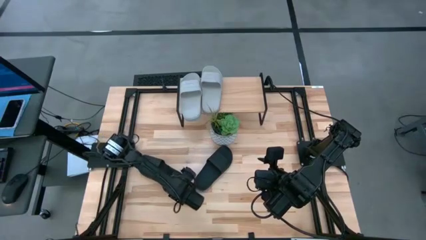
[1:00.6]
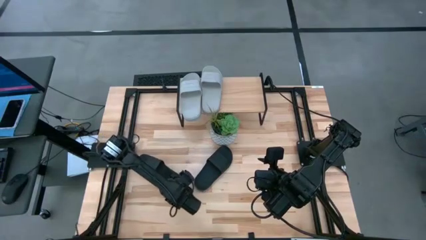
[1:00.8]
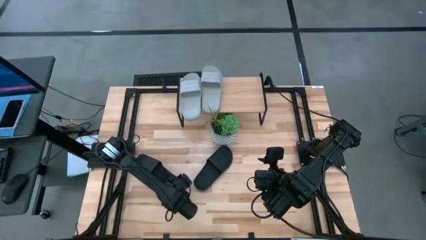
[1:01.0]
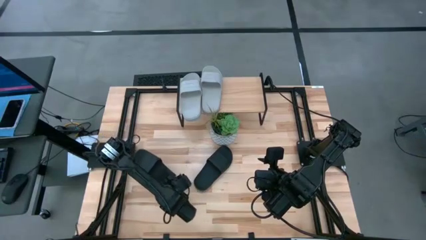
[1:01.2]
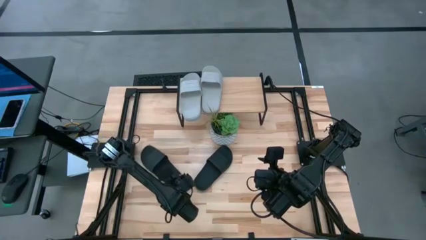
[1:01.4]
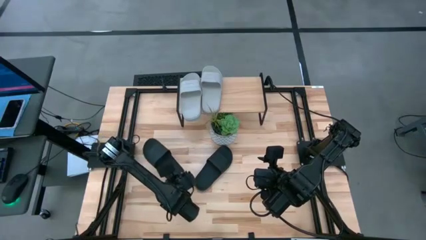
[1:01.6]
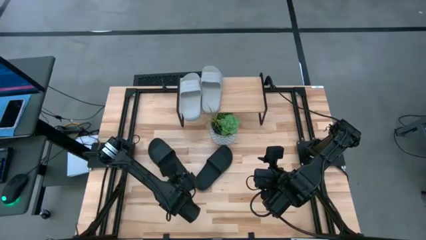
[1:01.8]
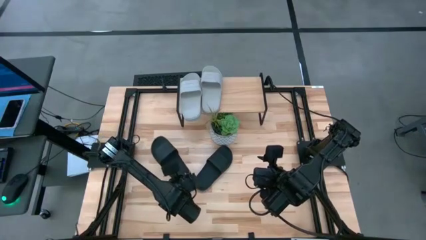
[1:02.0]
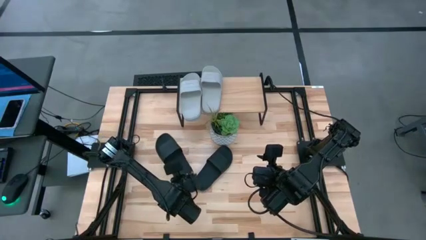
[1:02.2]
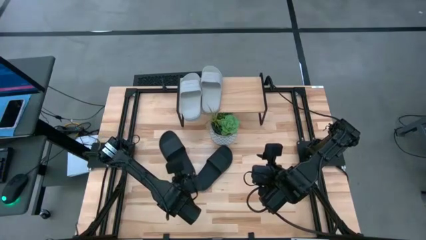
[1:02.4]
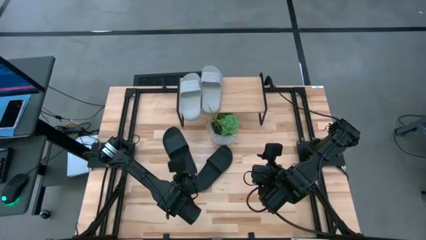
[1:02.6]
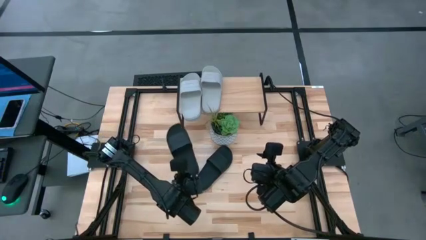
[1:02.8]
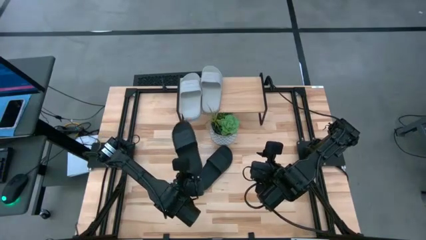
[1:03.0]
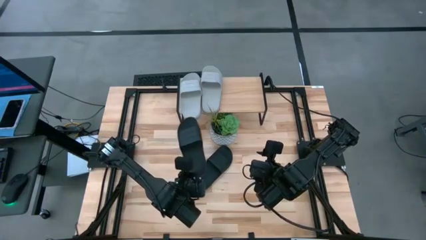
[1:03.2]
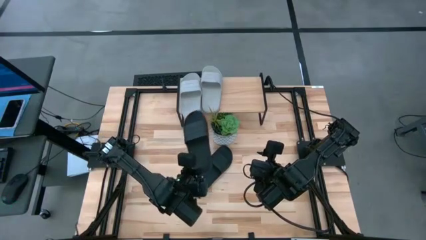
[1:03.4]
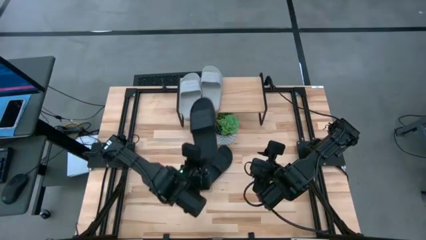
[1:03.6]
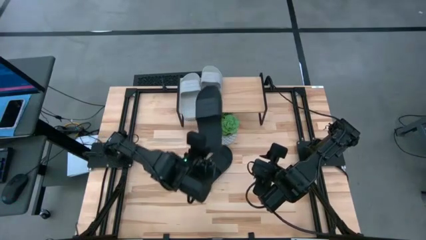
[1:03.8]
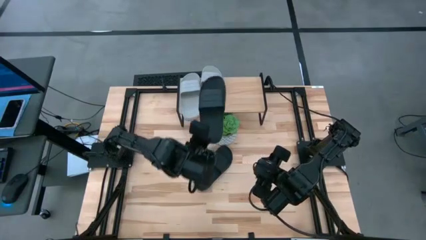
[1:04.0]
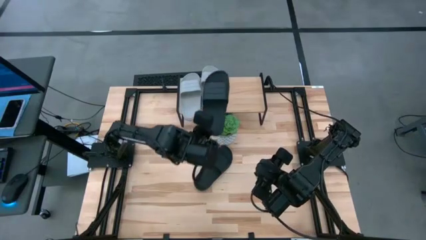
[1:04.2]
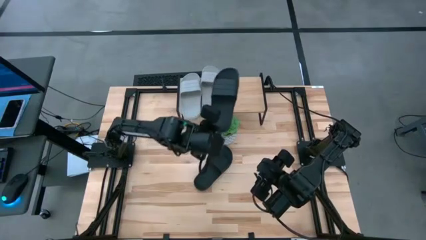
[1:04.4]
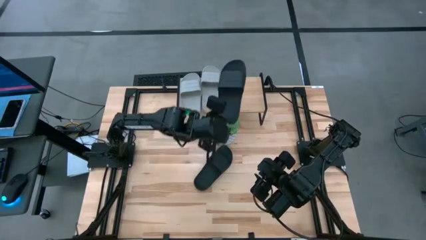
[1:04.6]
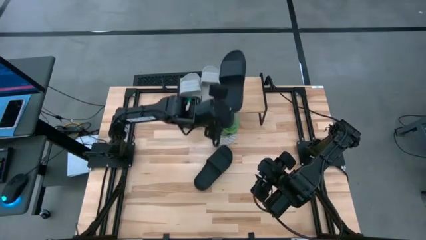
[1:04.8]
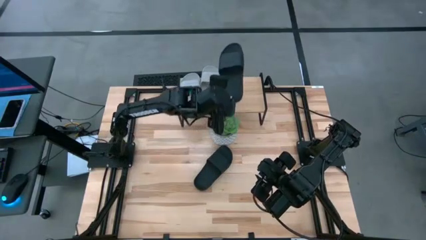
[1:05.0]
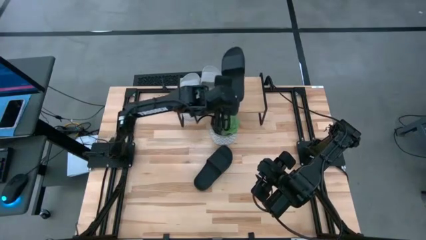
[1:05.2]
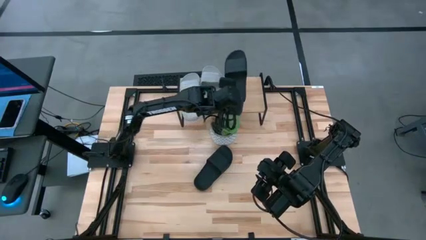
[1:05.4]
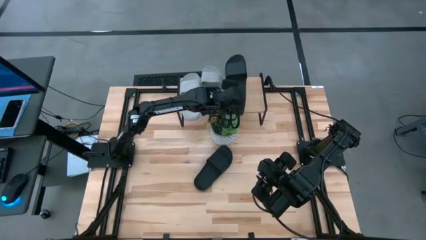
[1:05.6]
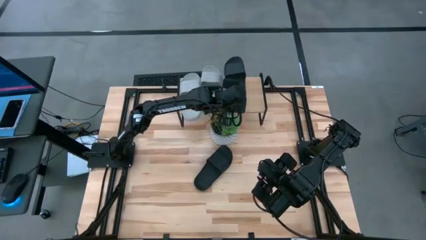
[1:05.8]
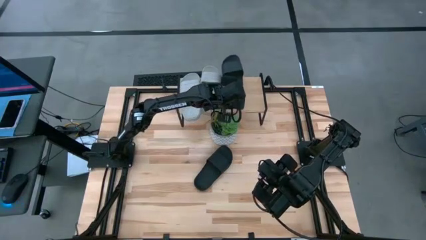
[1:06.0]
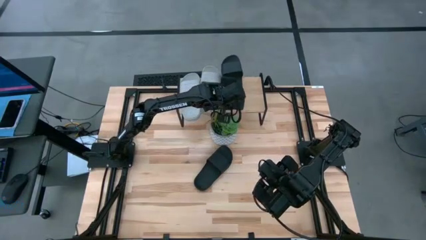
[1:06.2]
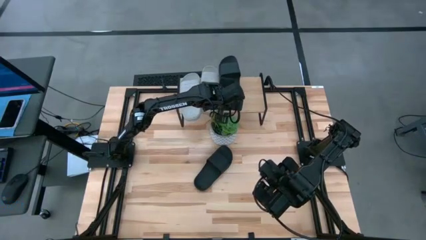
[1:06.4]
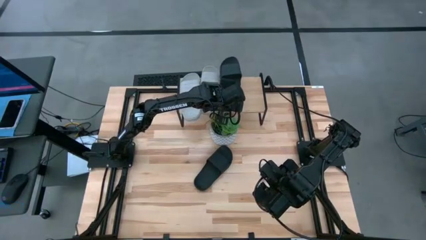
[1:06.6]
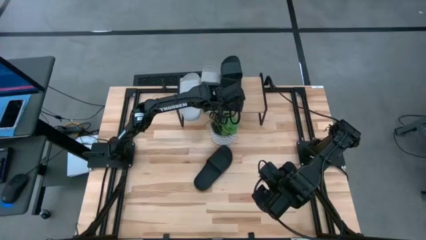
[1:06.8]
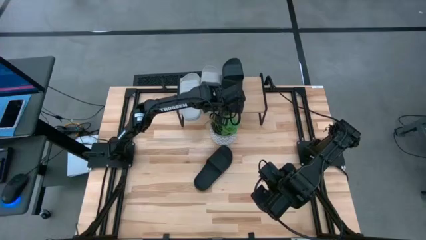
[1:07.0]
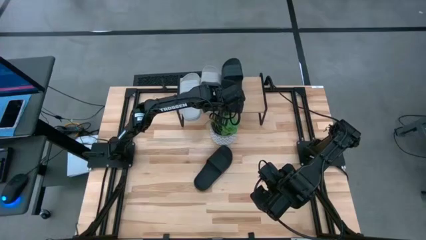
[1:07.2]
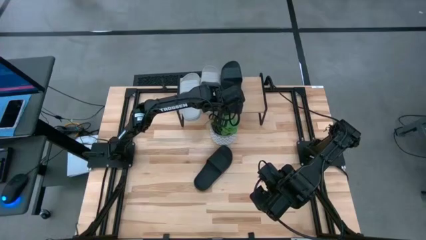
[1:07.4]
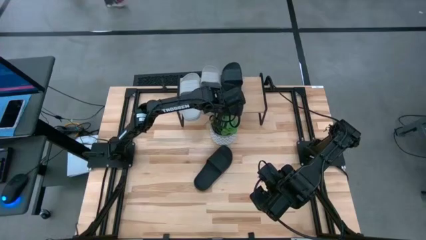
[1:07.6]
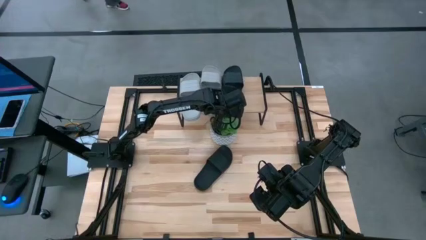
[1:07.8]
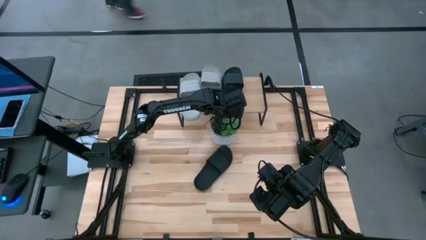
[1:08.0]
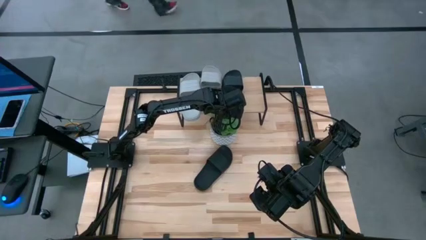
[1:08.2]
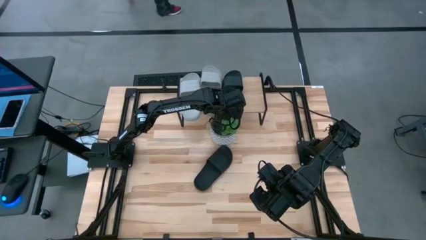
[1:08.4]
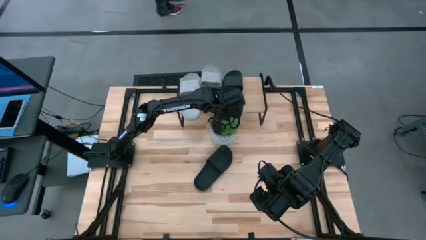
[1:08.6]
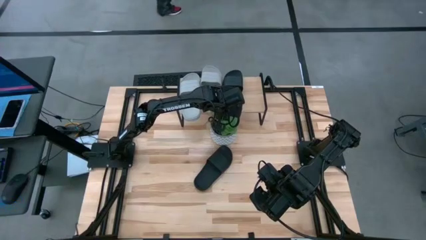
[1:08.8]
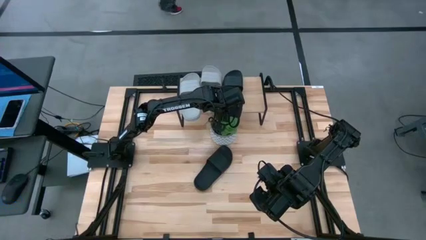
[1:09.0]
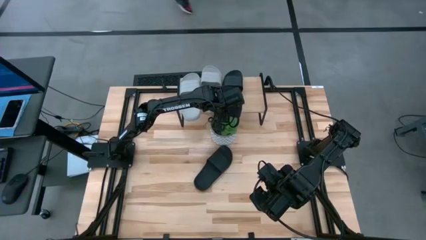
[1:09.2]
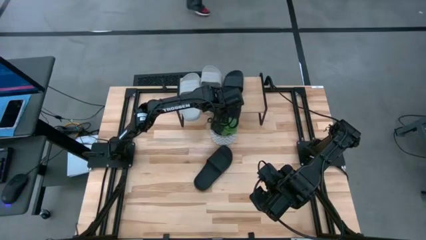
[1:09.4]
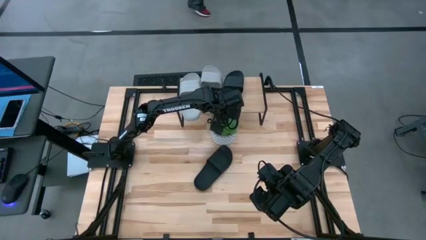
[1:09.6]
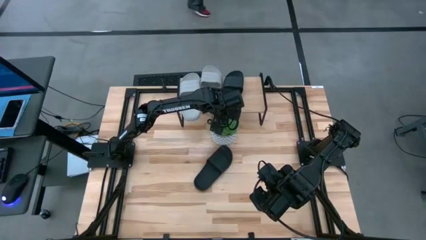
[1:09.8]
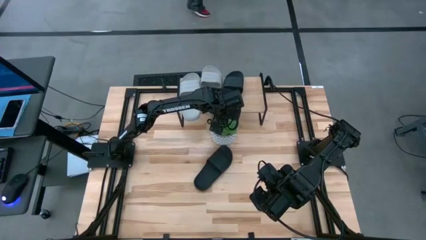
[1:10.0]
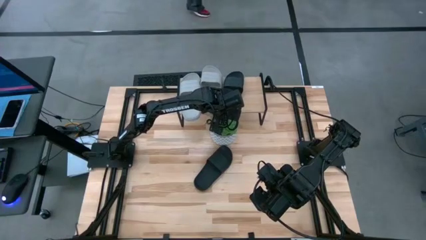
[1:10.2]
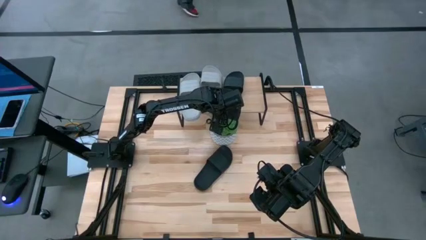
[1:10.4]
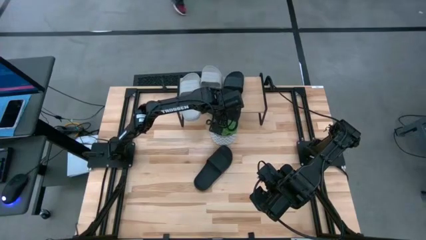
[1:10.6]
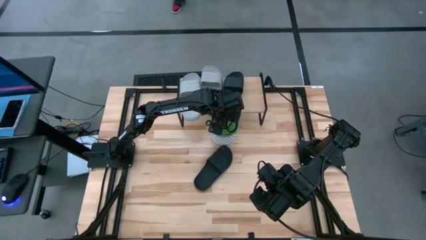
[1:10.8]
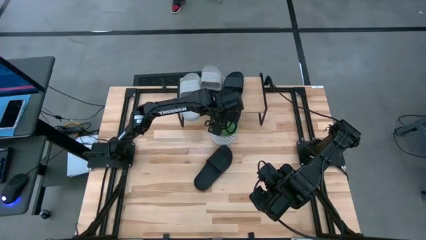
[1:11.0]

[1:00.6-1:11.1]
Task: Pick and place slides into the shelf
Put the left black slide on the shelf
